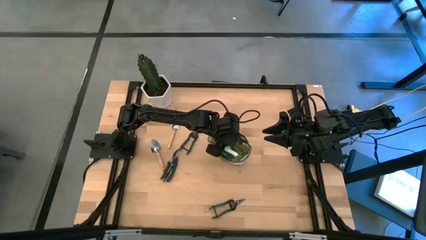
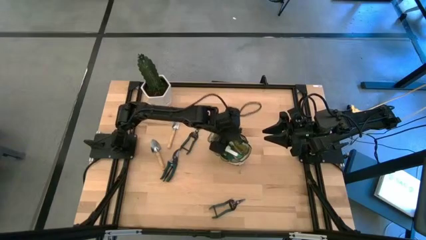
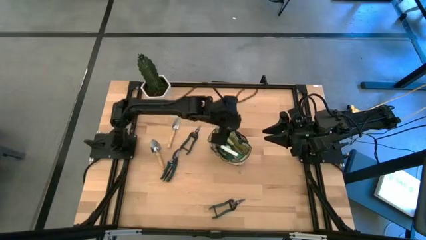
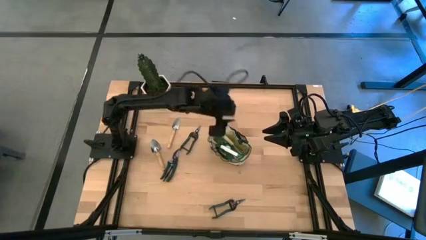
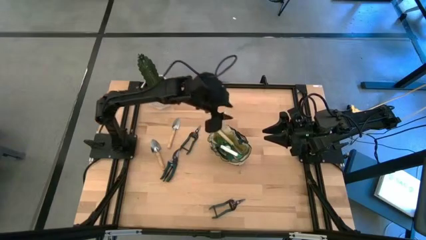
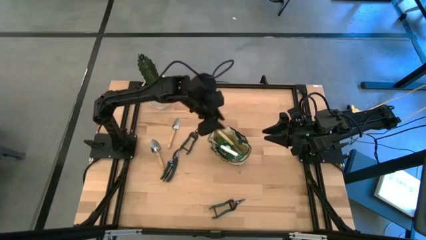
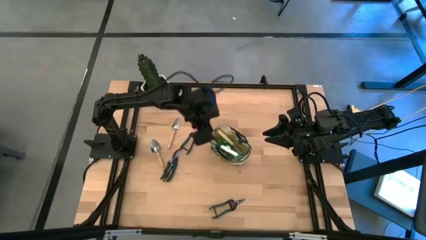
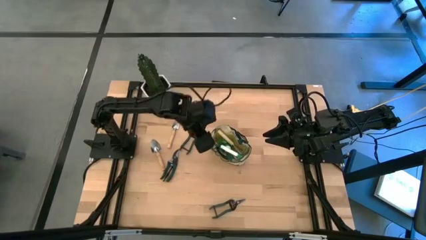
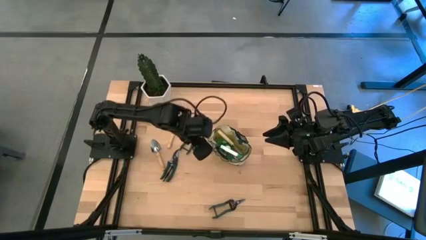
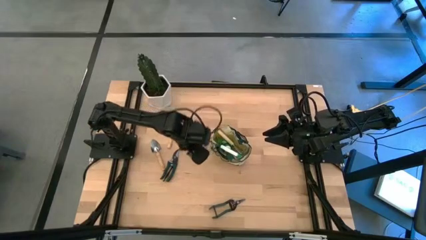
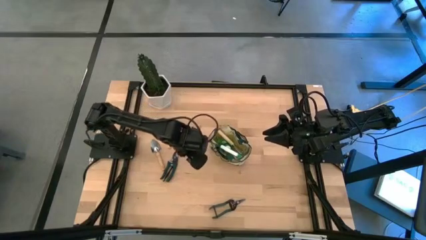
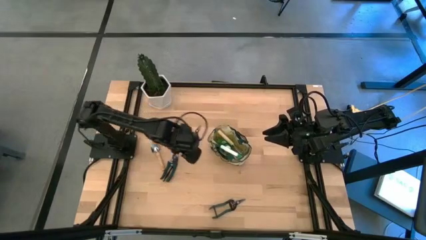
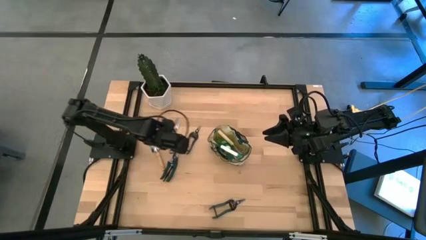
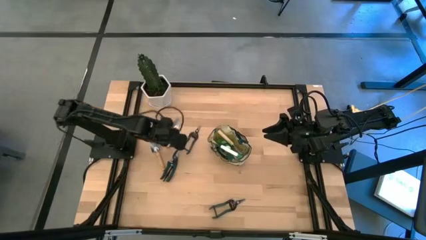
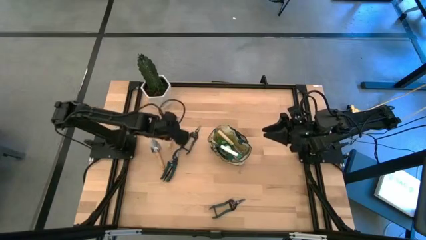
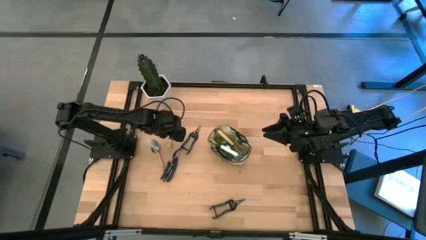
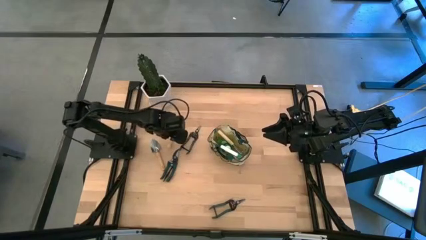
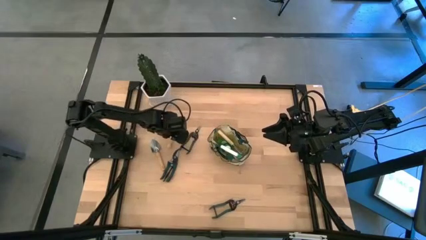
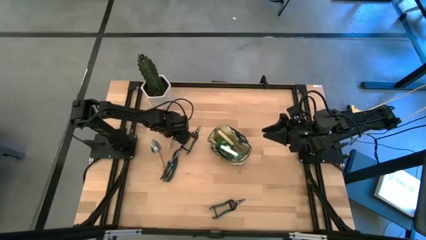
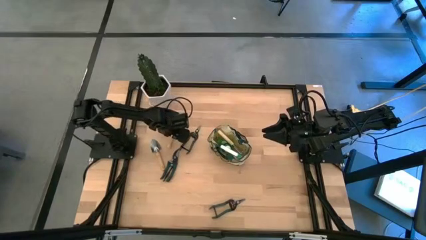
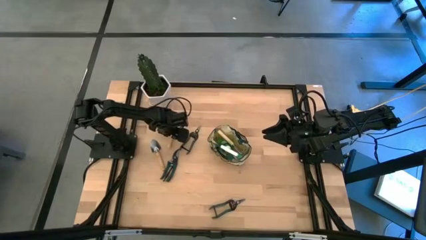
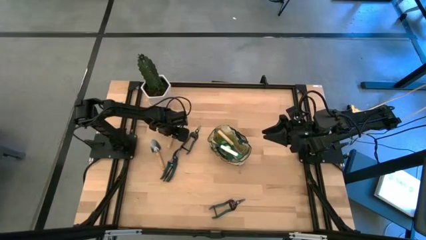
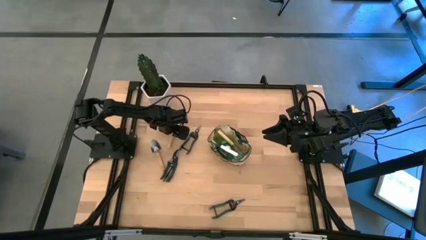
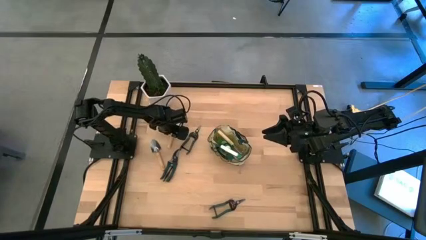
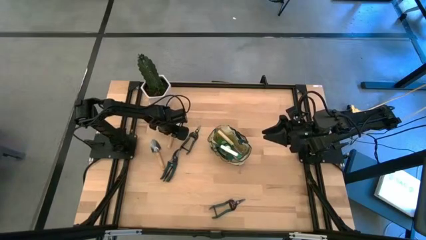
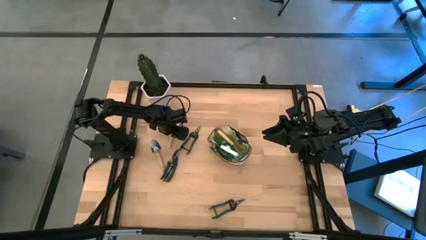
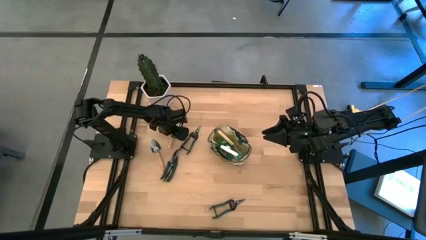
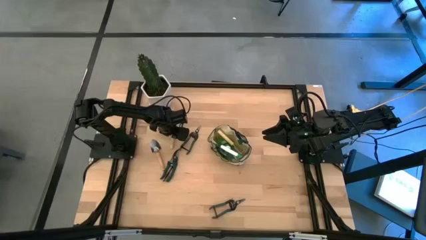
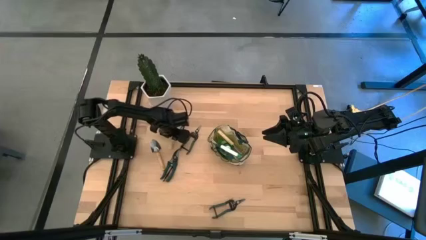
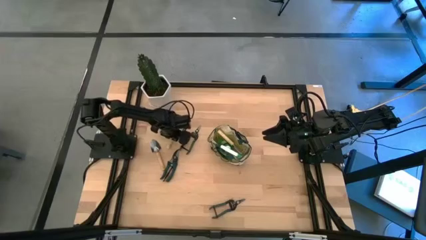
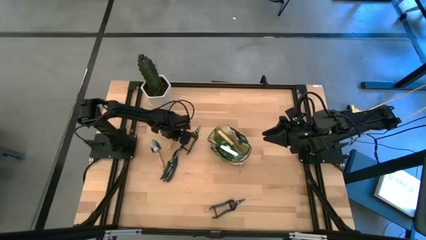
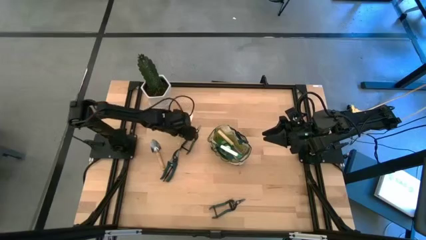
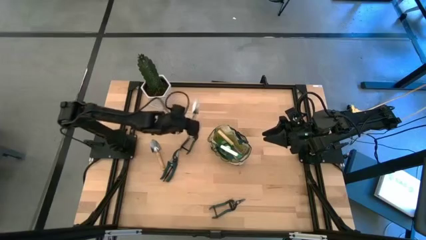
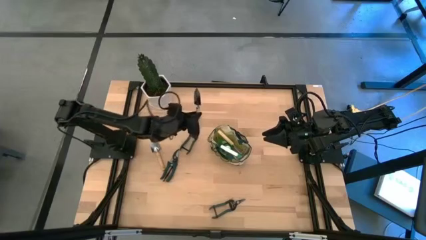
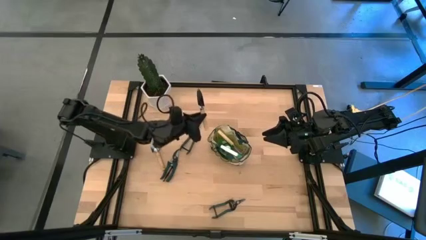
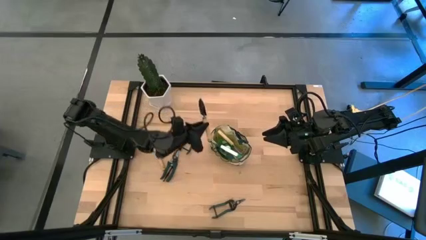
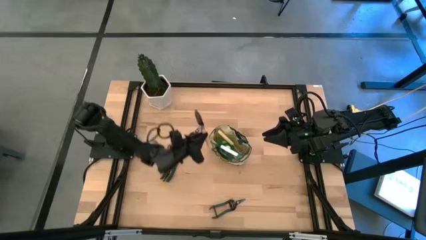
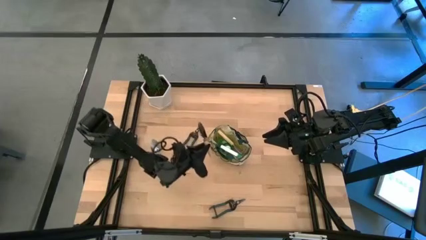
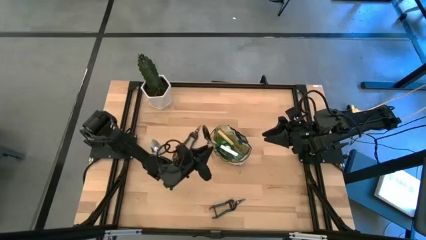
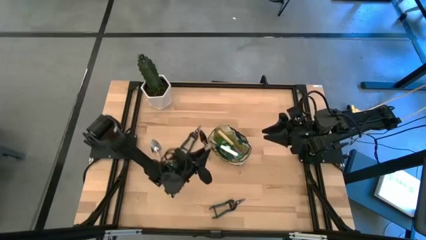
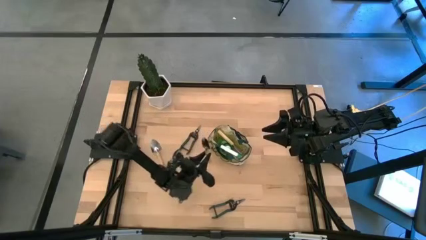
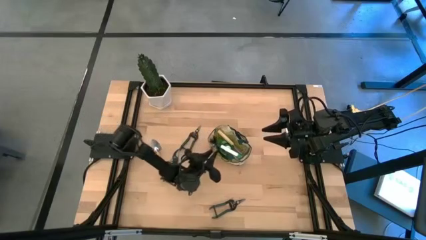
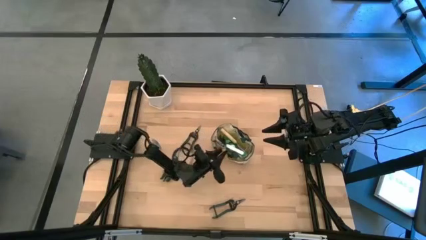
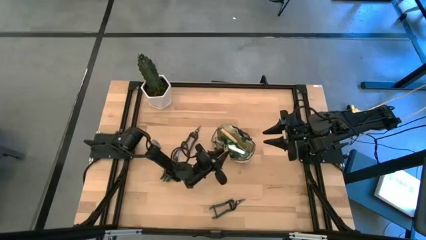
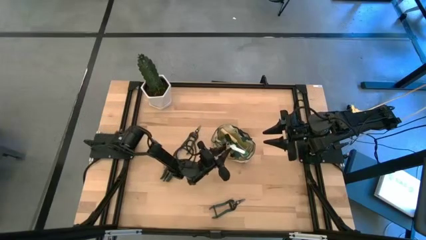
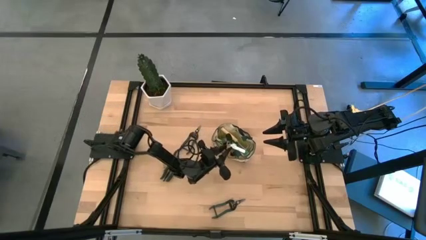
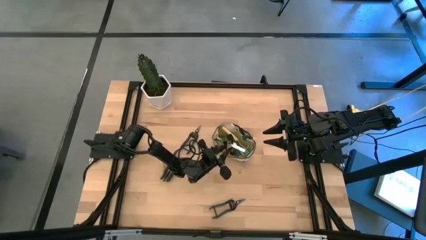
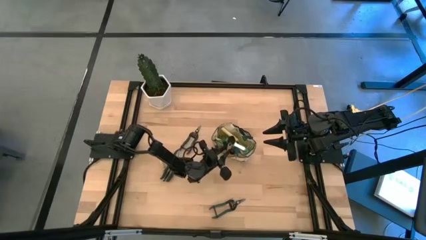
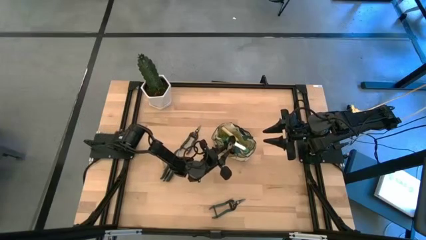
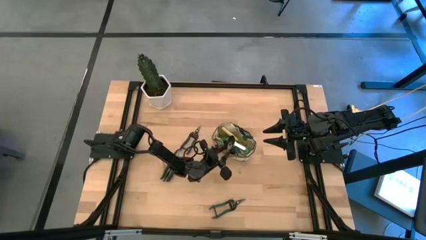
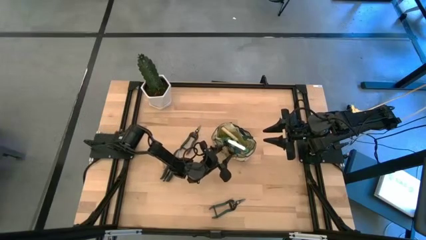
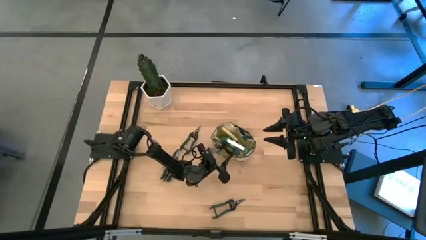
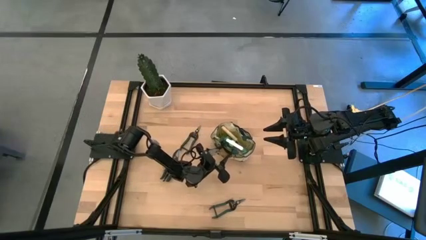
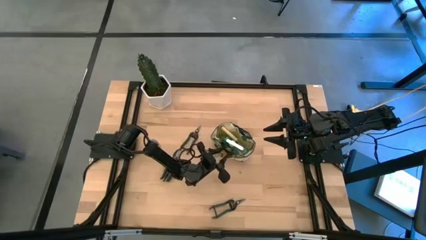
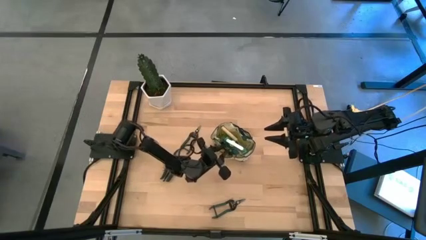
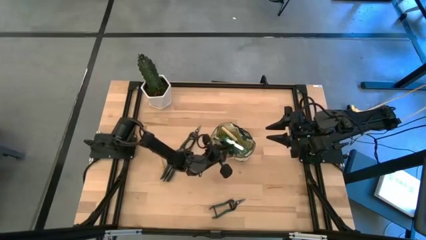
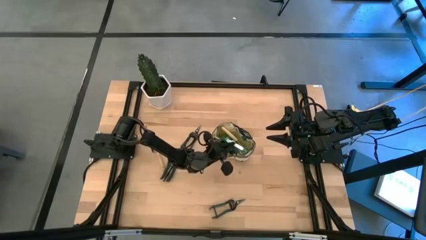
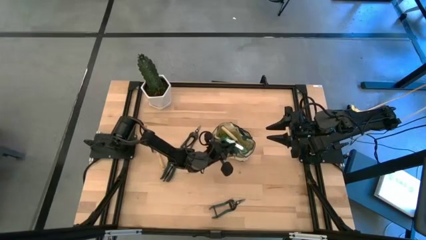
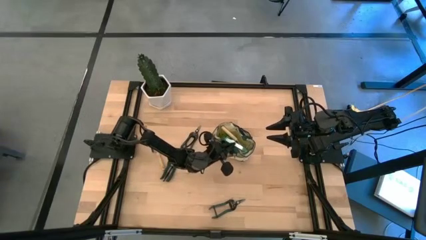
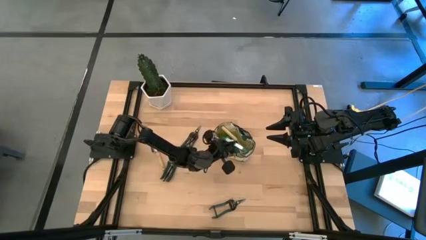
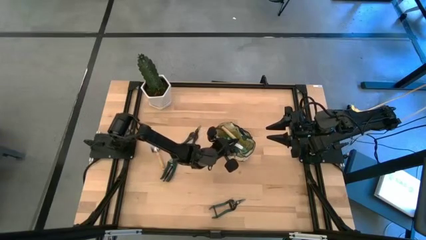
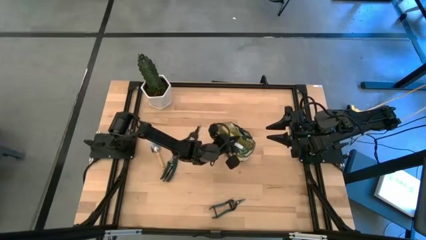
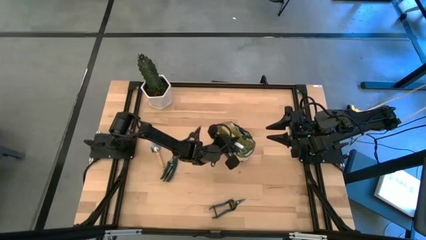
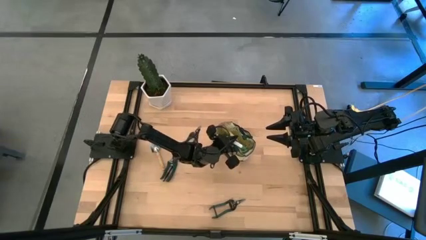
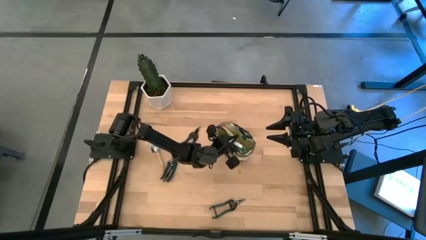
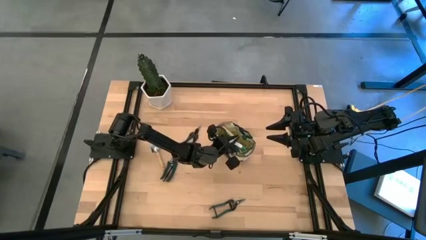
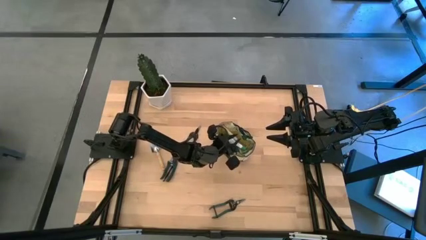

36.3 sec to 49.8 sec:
Task: Pick & Place Garden tools in Gardening bag
Put the top trowel into the gardening bag
